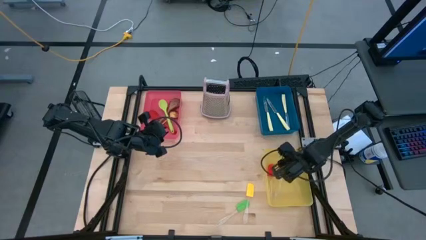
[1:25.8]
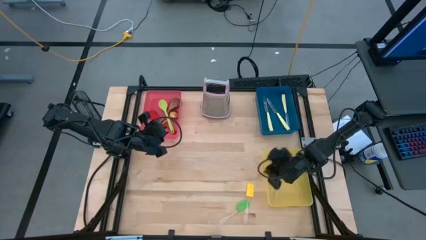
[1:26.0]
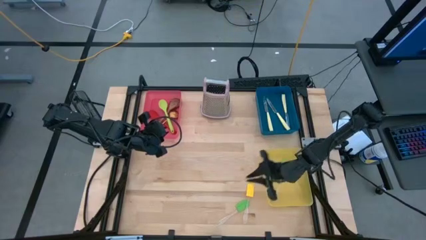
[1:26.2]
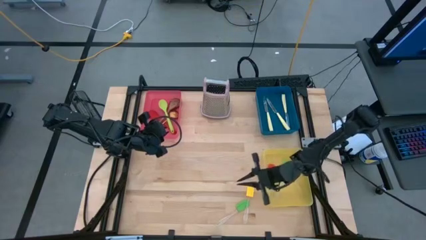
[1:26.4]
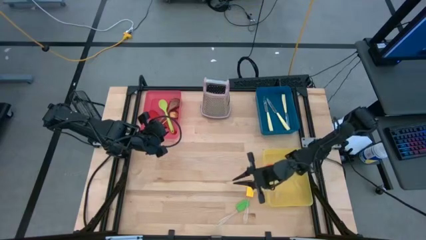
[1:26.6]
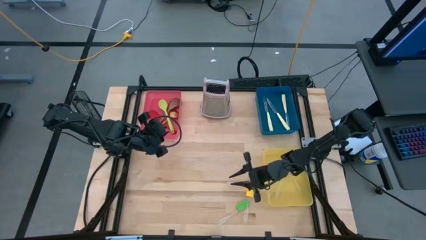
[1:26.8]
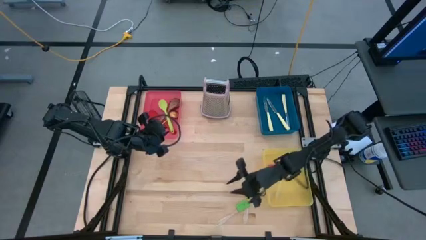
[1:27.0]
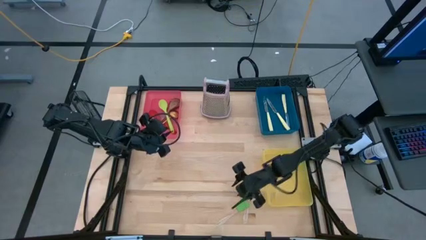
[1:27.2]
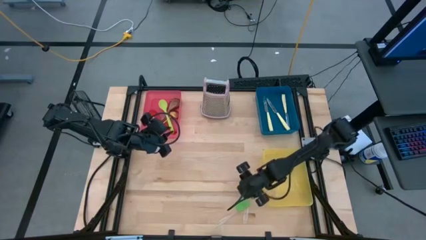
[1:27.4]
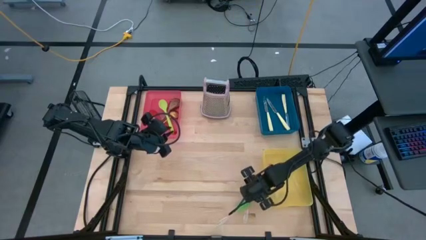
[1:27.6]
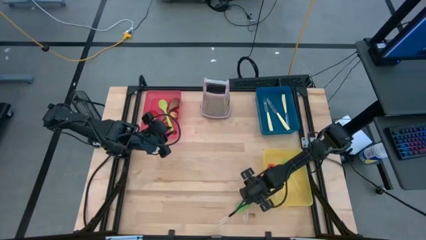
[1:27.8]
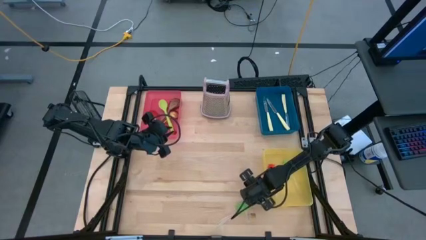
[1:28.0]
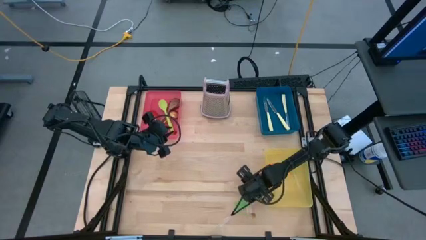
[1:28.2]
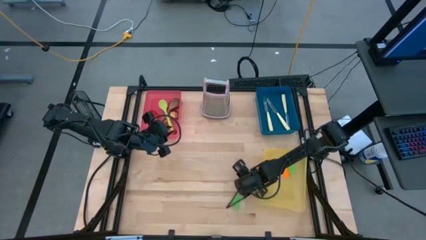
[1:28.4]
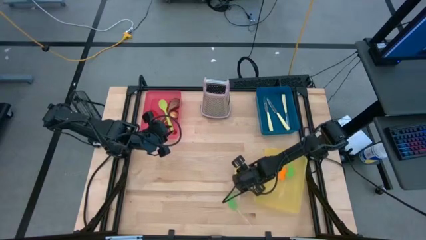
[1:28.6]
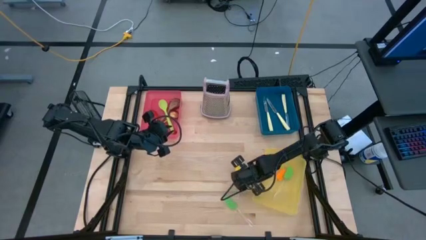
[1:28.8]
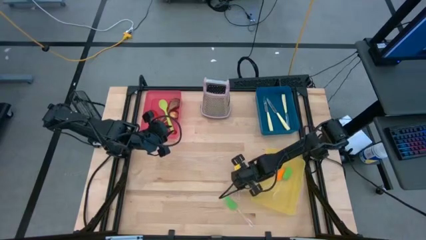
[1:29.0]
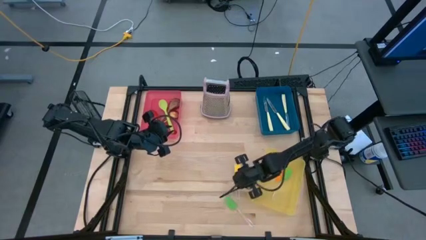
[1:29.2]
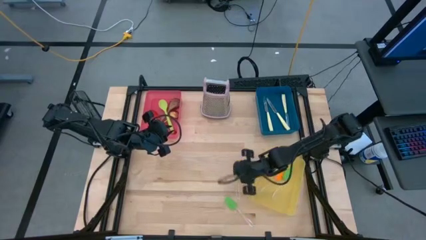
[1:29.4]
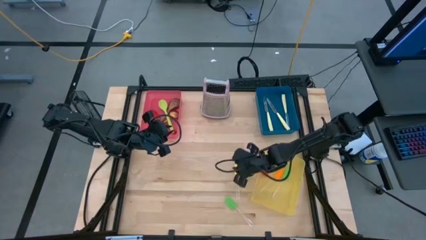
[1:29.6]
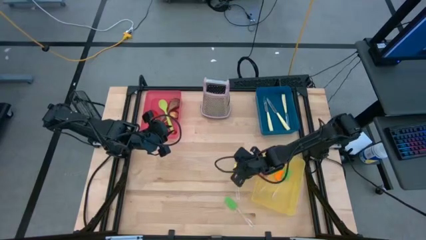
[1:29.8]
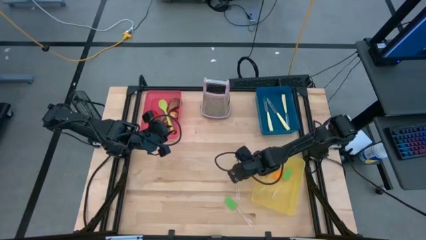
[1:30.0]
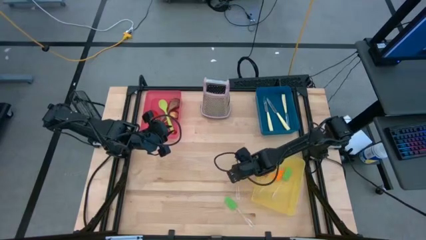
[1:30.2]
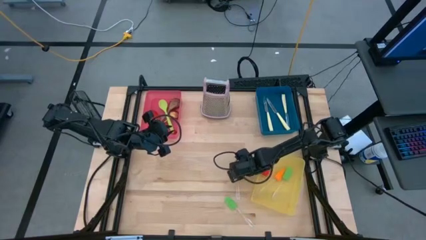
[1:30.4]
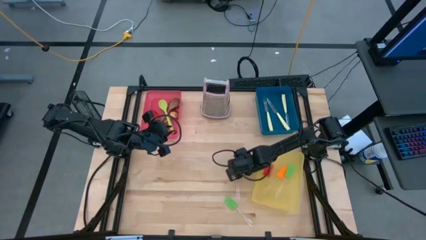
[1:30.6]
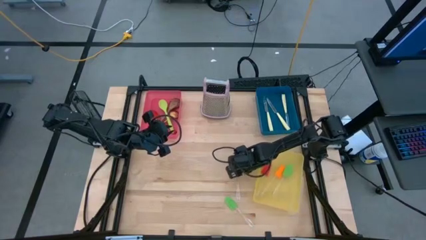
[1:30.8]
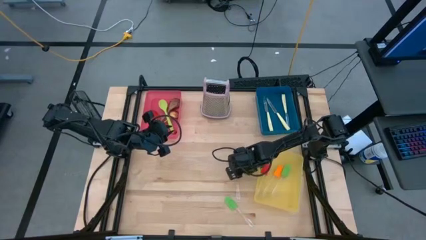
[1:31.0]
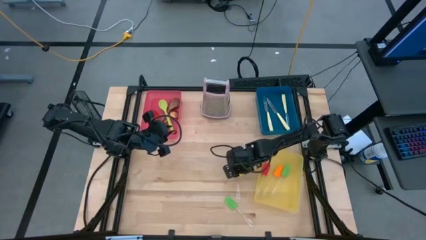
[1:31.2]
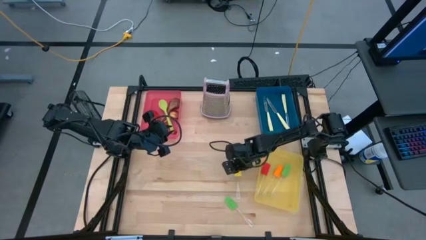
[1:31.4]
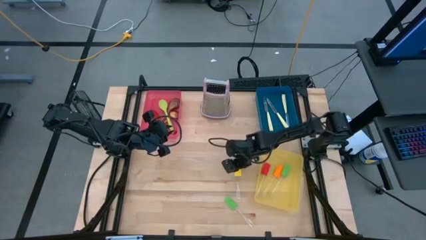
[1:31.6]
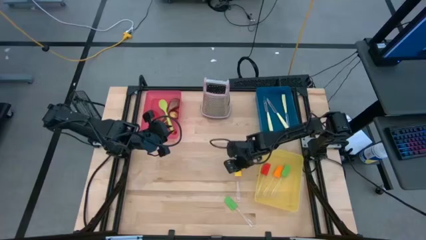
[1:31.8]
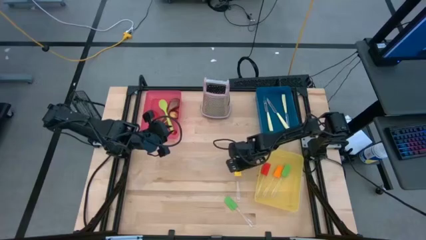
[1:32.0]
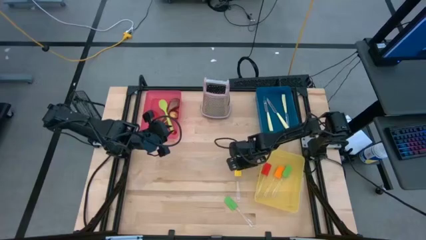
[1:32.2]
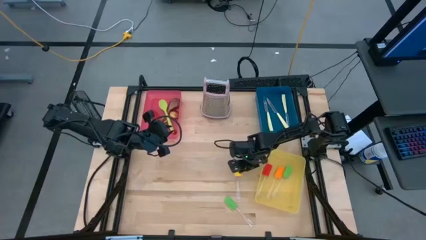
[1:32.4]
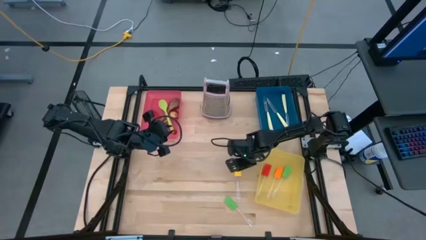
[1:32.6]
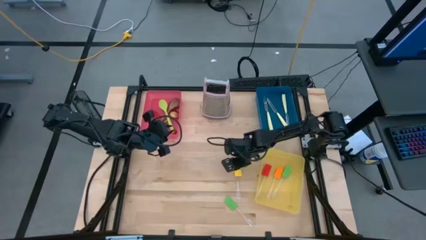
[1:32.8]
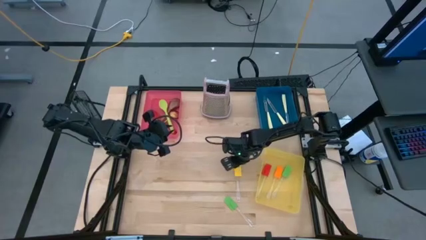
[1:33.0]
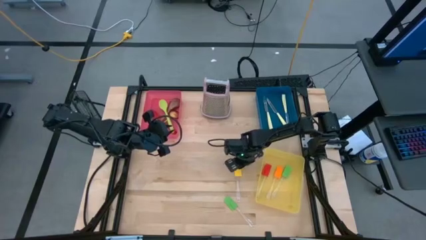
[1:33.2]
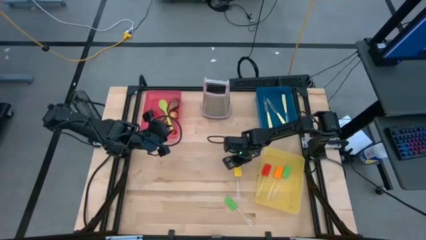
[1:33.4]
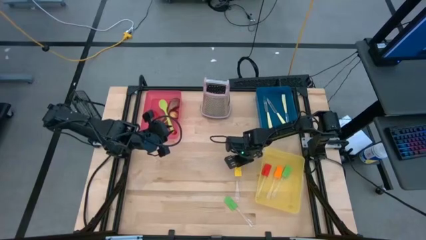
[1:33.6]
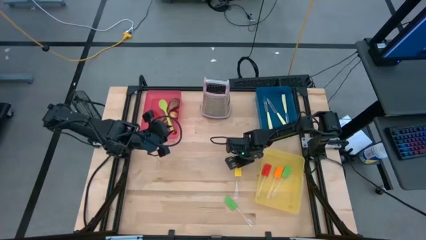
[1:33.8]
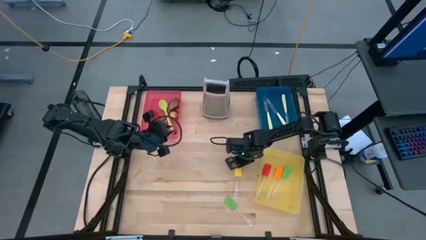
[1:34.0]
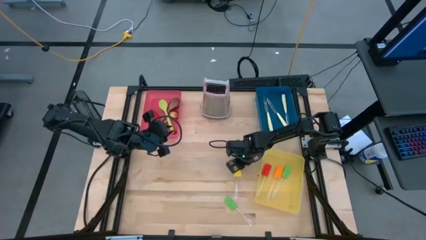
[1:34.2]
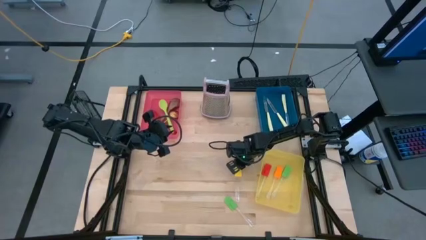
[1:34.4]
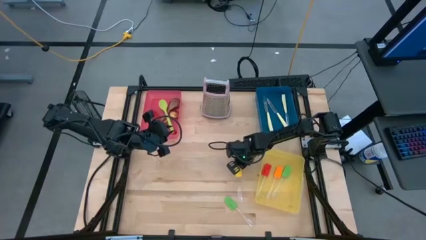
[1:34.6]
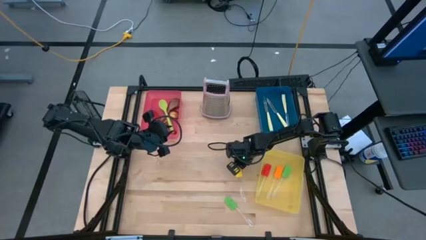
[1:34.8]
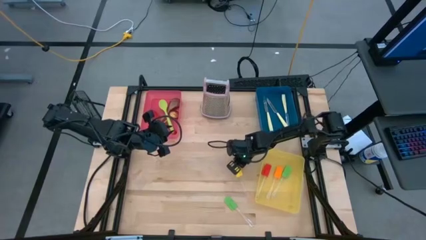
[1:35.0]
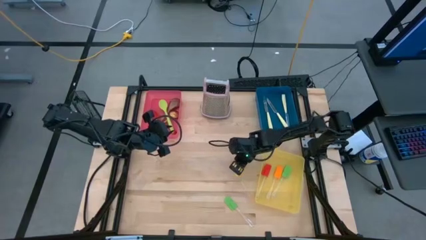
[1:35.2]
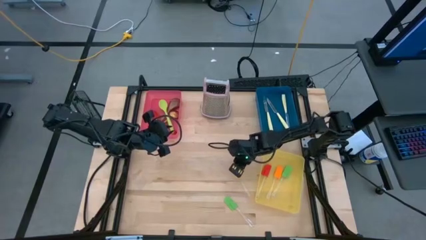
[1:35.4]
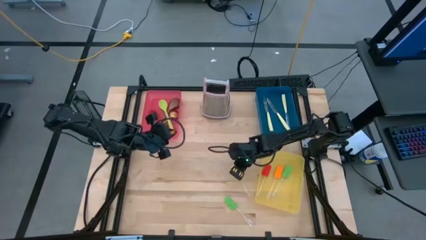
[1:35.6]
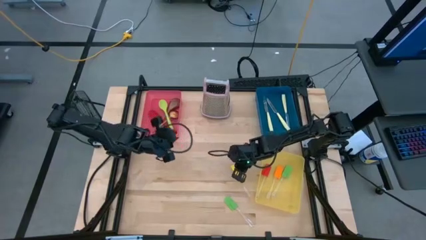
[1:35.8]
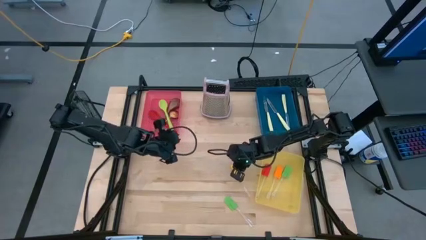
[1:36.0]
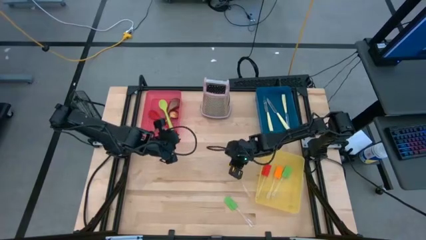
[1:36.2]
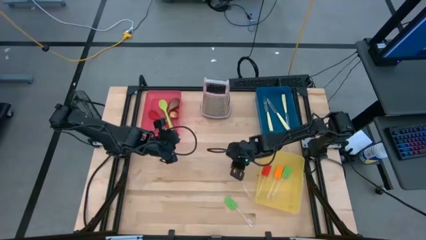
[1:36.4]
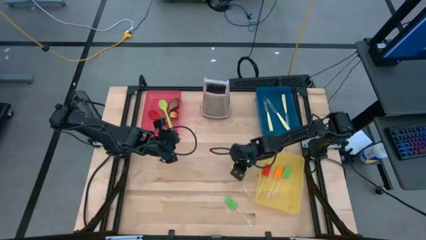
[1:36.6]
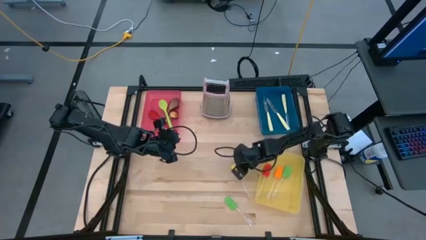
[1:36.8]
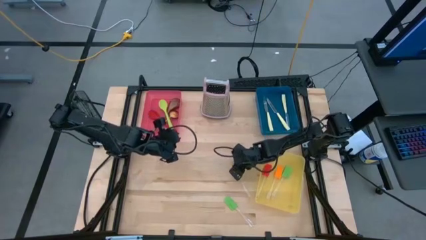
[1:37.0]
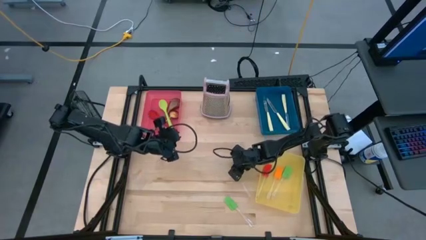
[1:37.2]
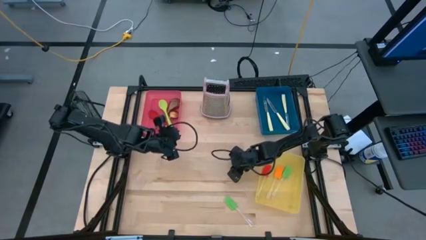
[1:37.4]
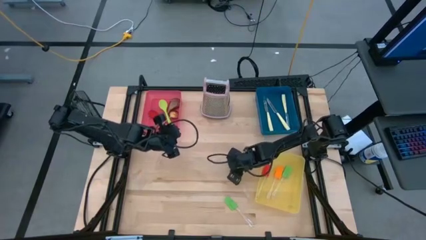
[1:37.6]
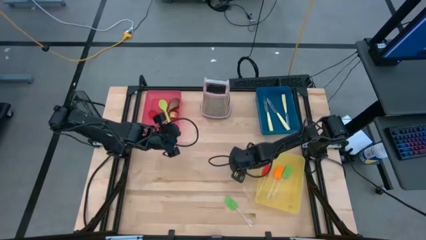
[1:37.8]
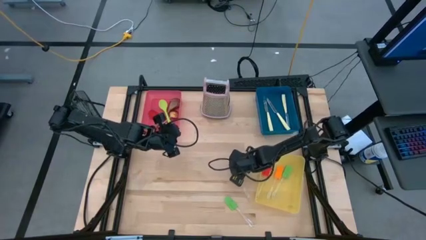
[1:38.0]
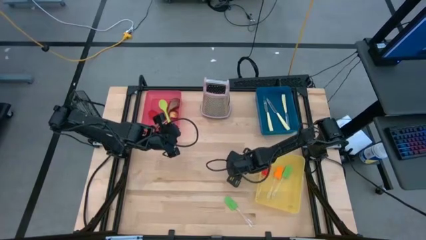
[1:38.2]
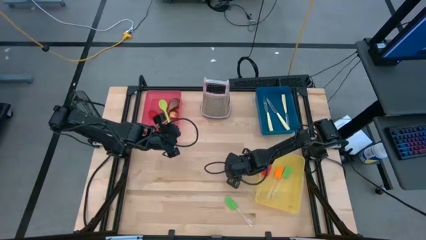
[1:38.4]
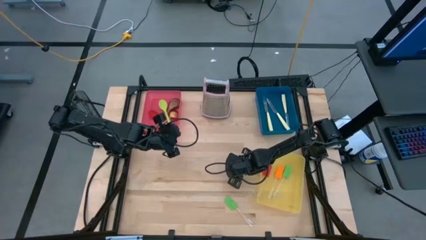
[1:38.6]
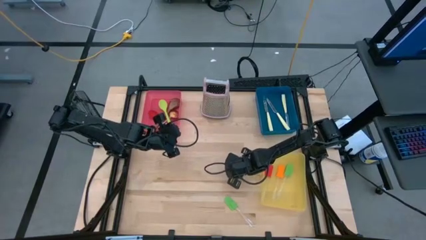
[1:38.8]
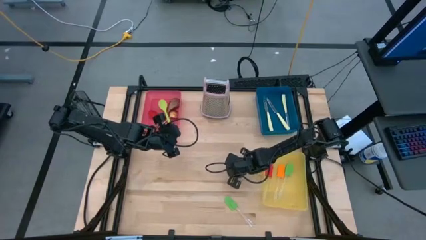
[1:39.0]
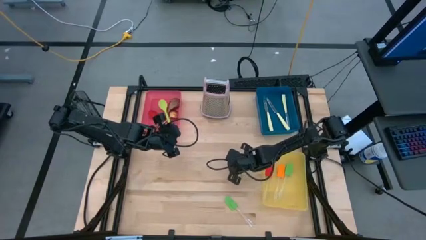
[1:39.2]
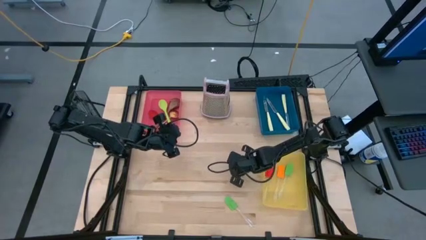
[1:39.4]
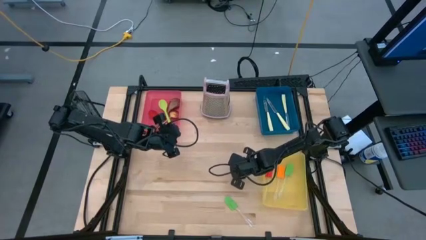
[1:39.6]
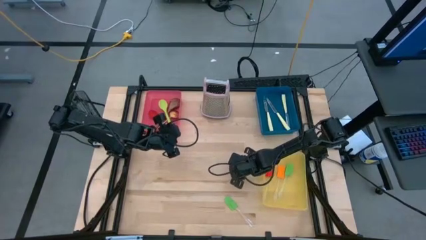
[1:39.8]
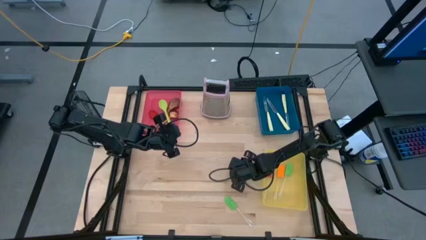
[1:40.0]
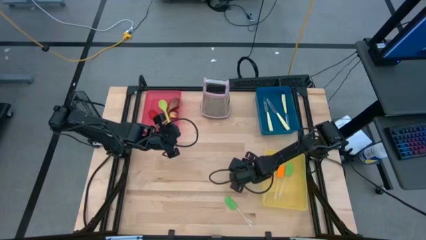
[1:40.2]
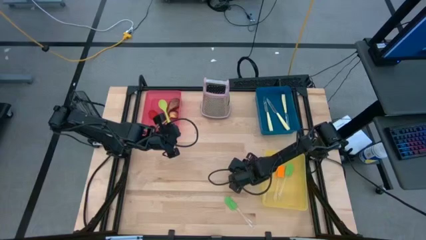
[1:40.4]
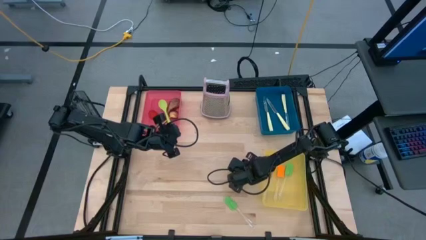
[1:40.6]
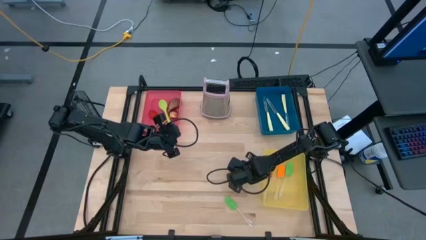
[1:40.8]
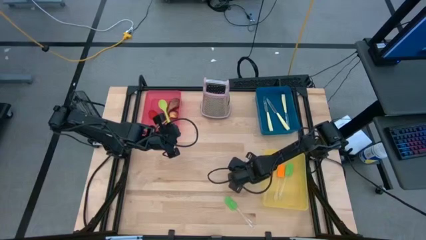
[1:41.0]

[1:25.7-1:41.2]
Task: Pick & Place Kitchen Items
Put the yellow spatula into the yellow bin
